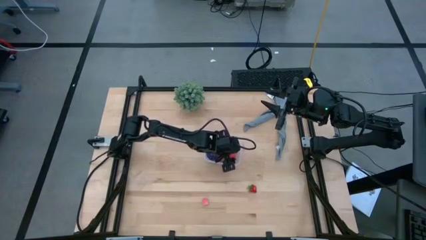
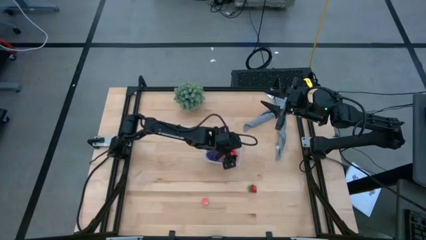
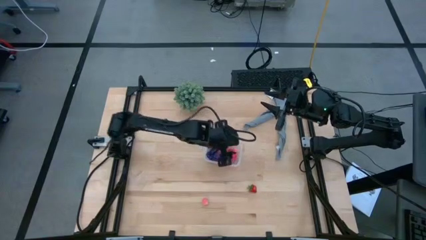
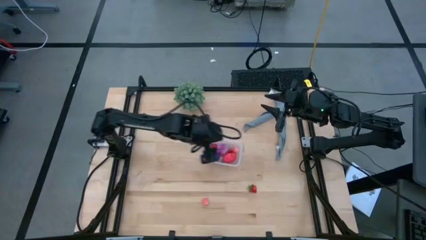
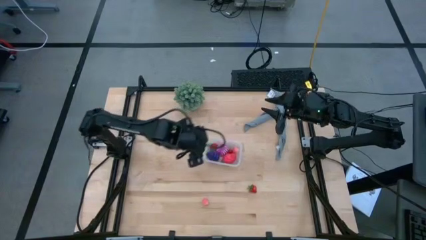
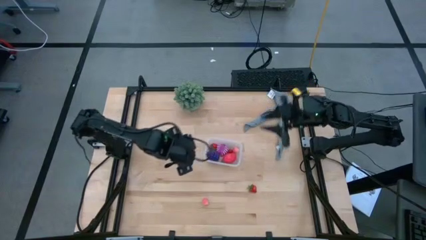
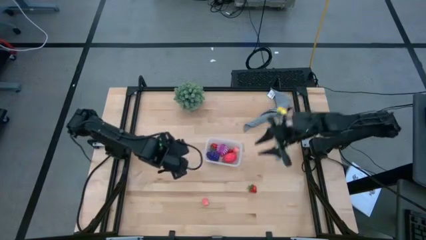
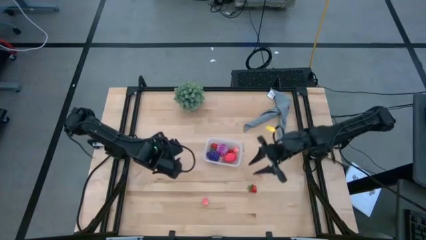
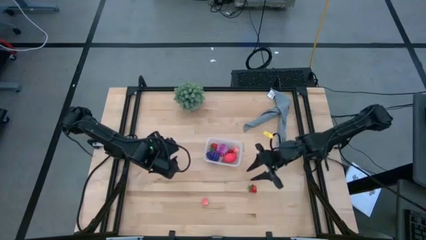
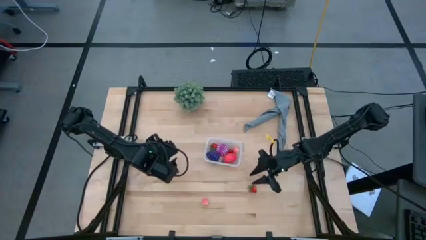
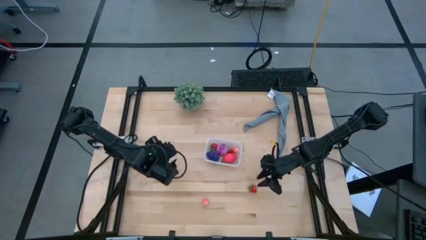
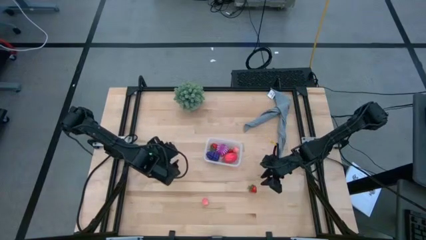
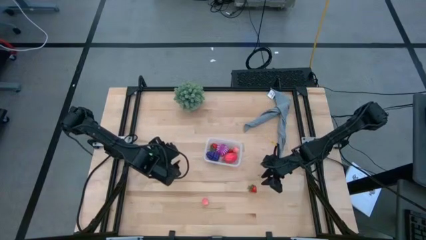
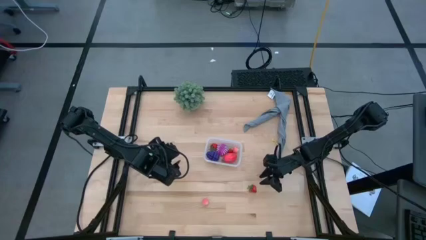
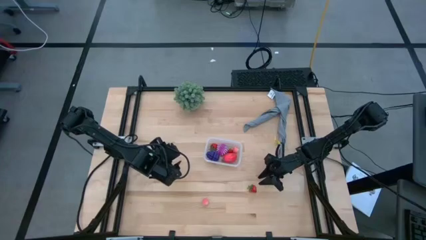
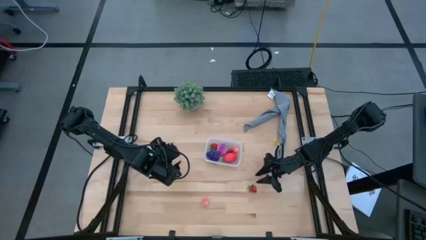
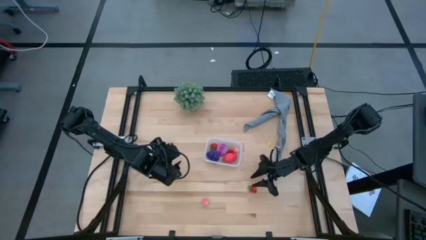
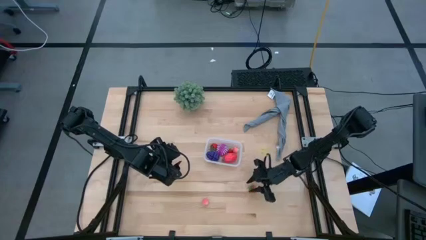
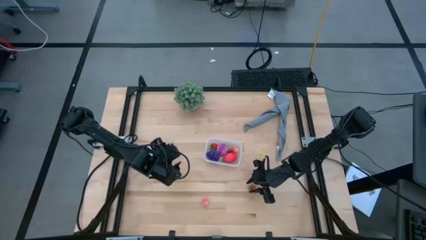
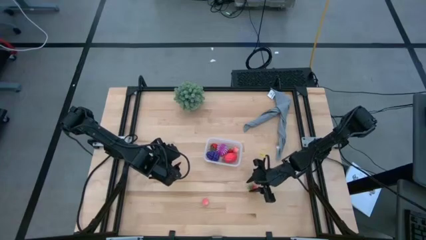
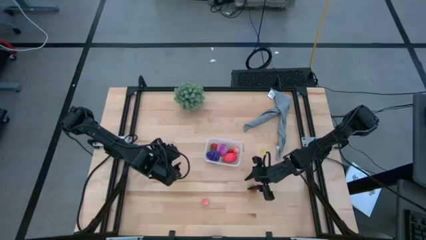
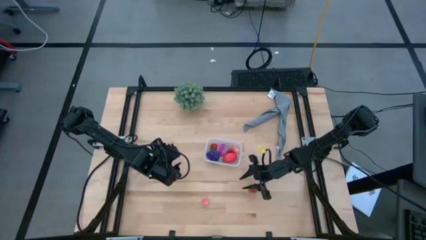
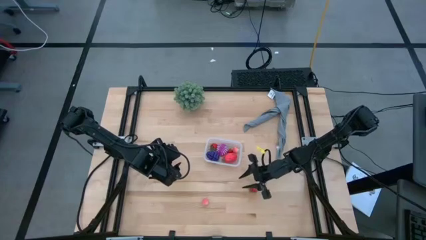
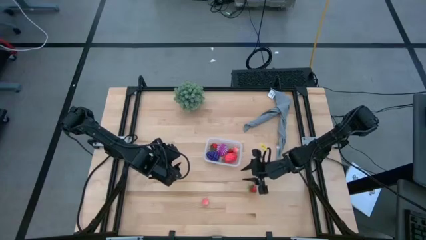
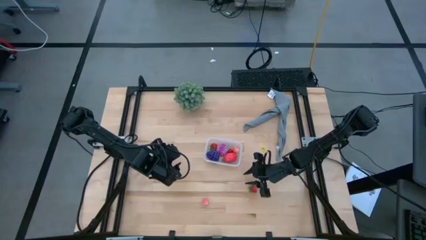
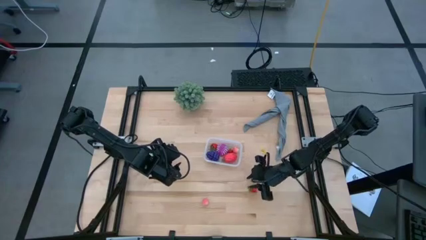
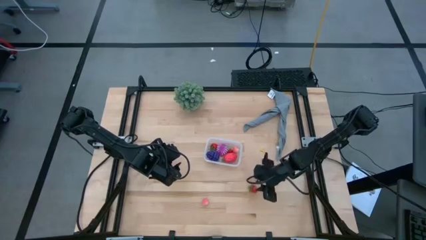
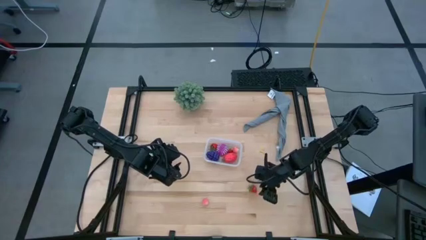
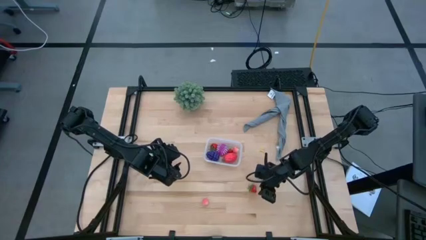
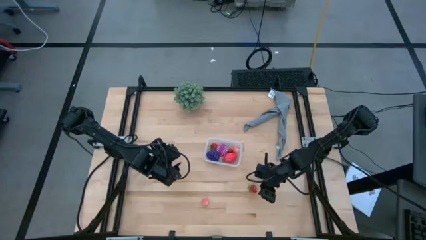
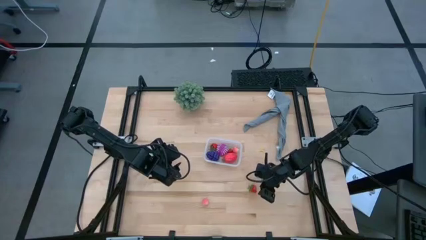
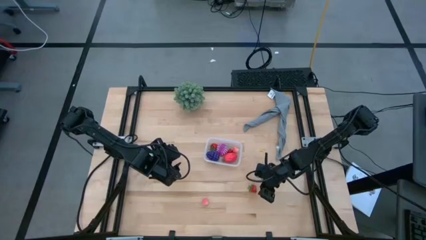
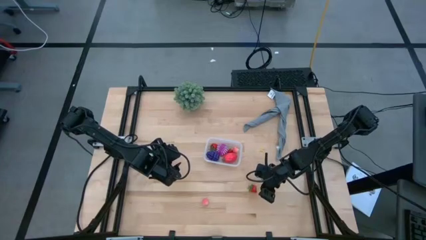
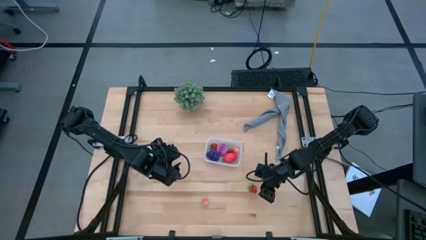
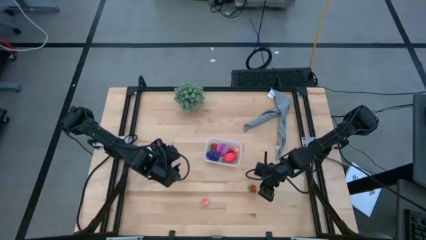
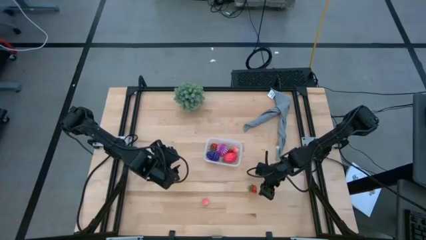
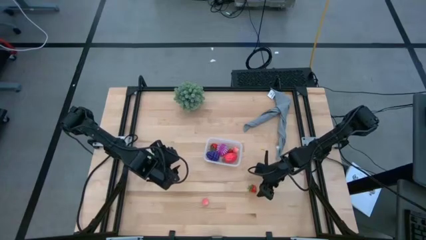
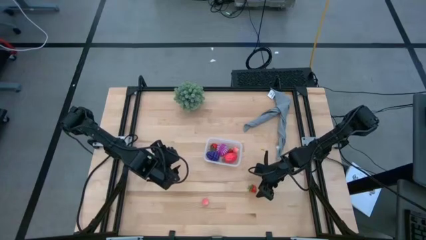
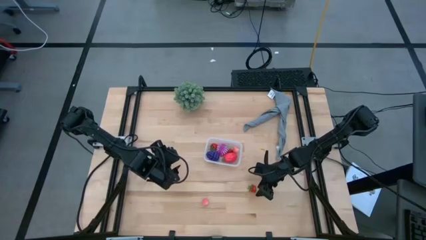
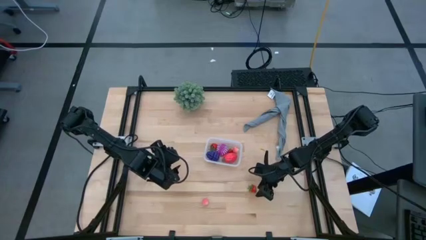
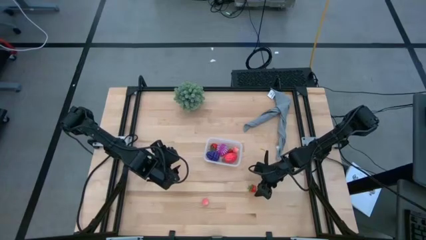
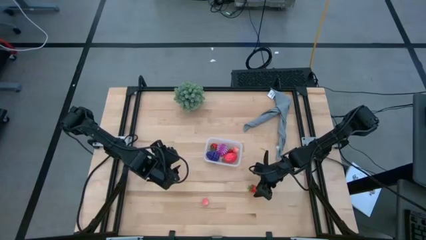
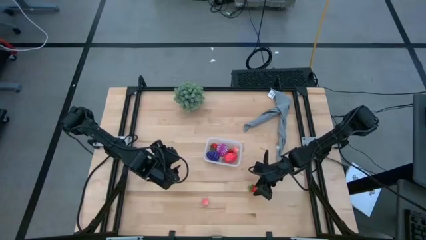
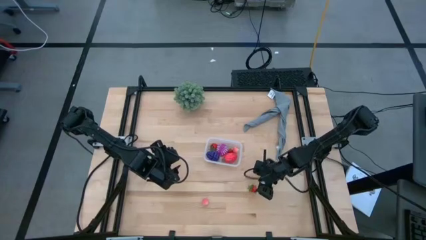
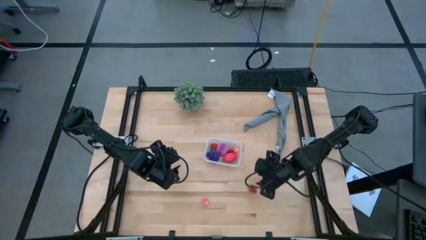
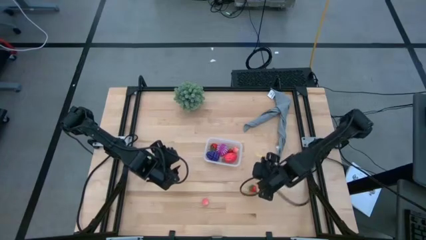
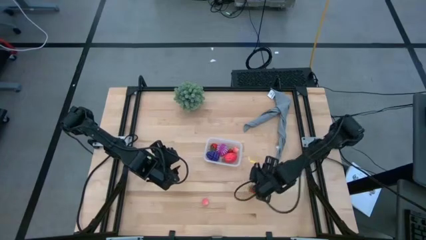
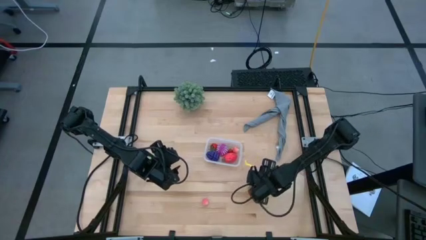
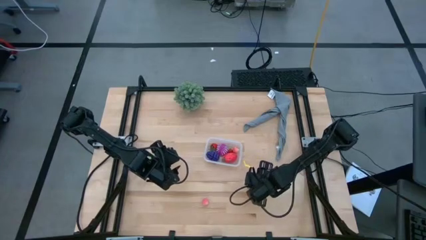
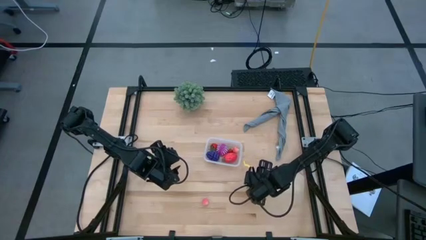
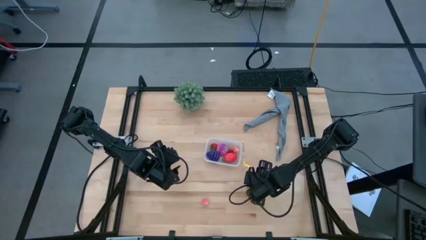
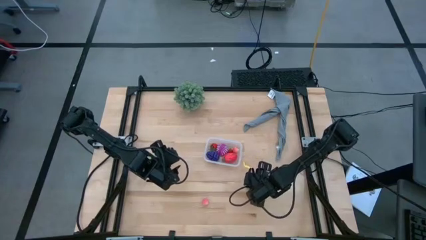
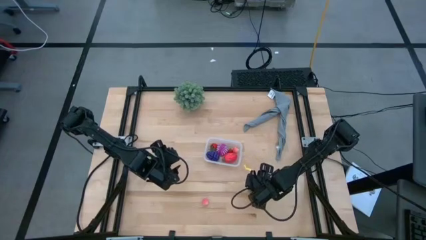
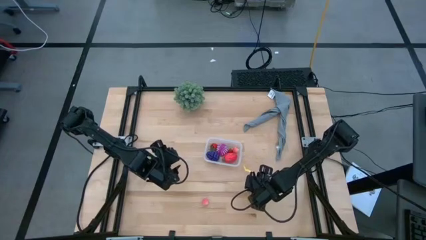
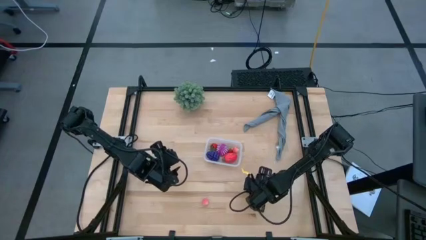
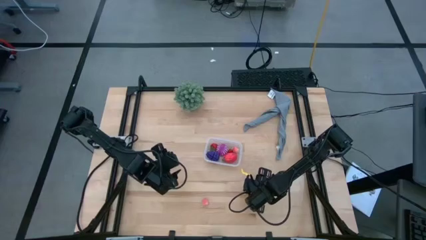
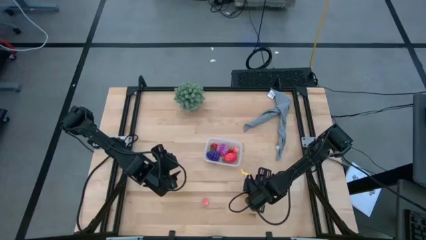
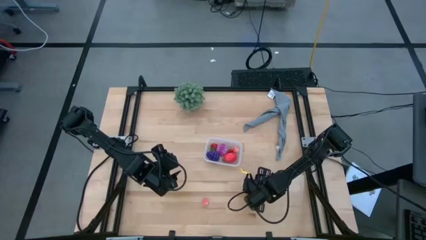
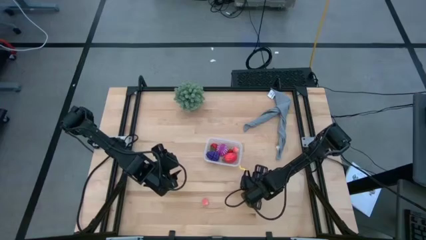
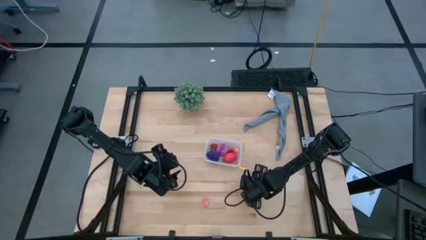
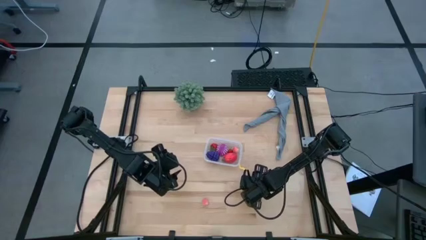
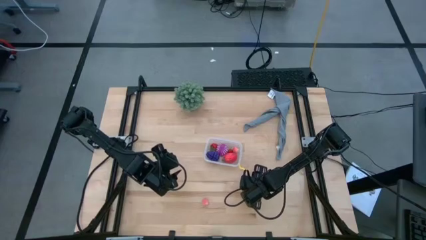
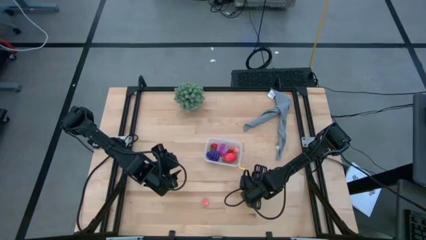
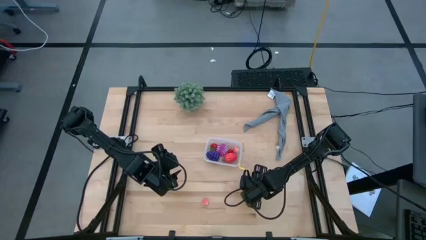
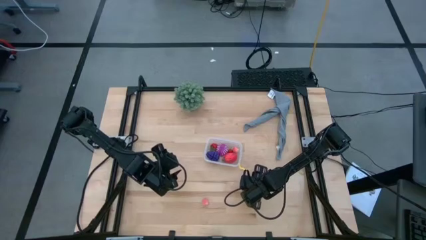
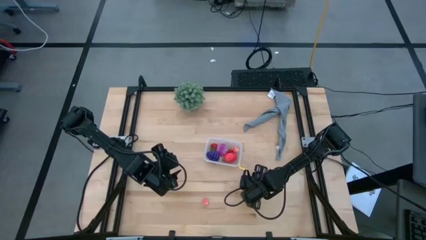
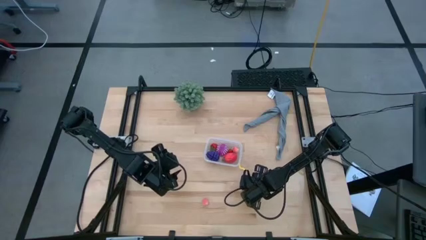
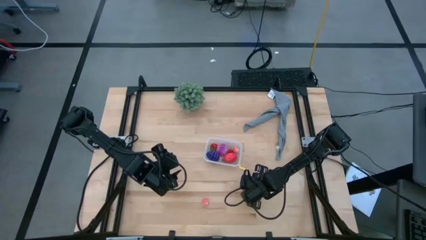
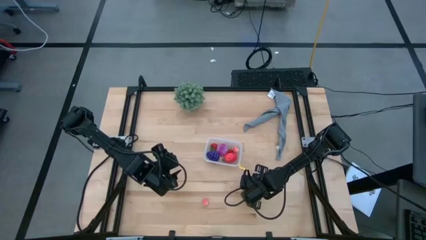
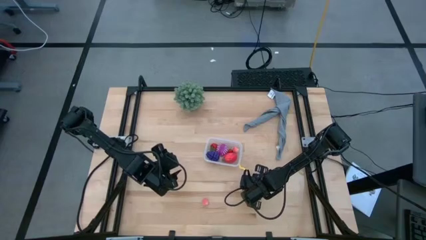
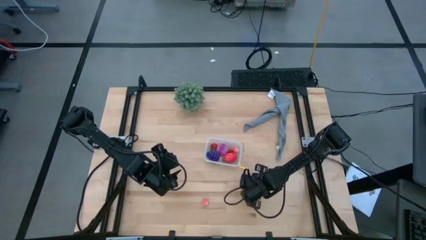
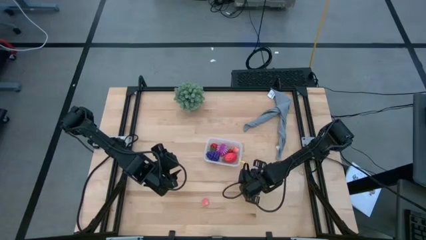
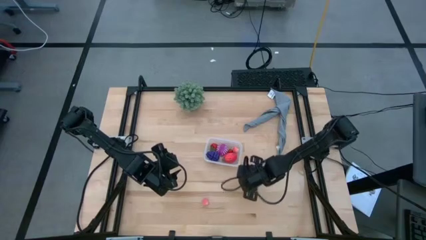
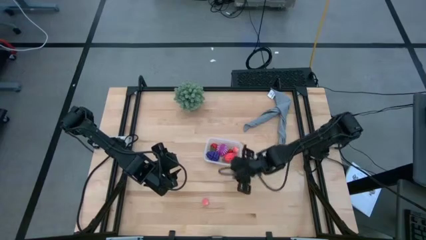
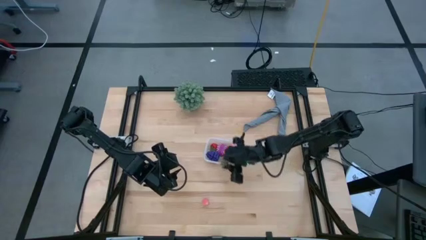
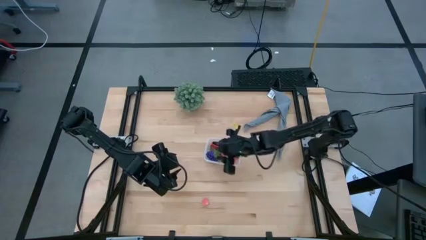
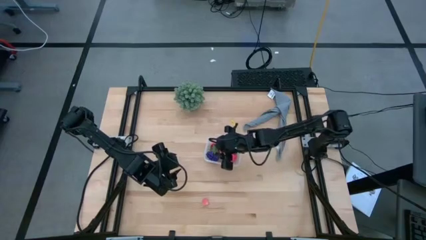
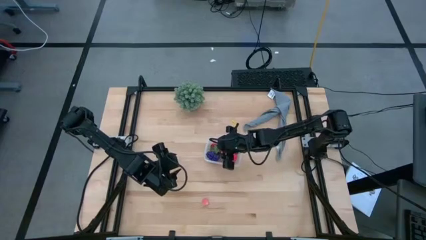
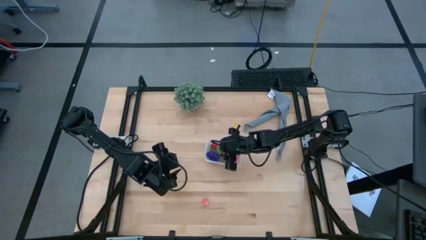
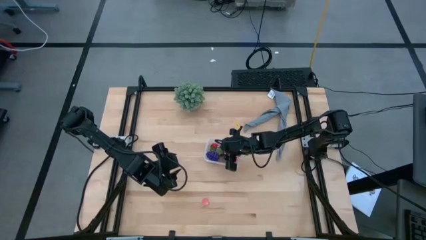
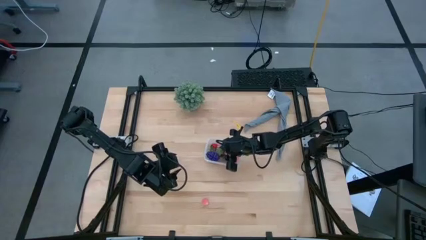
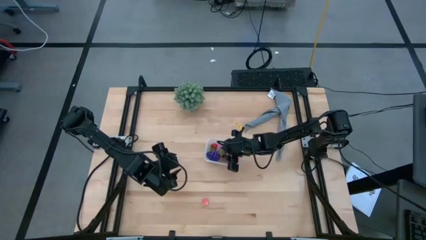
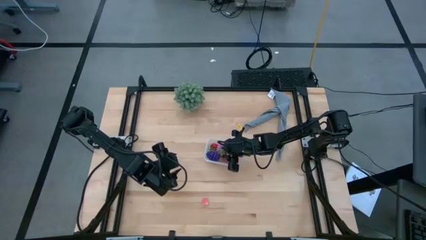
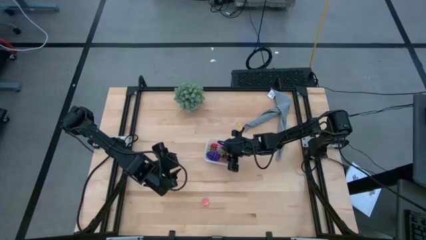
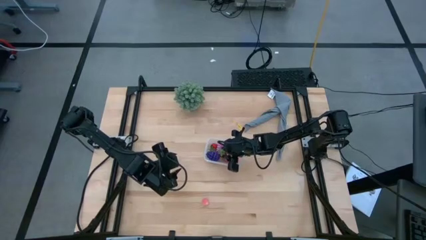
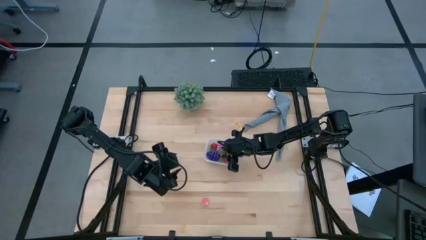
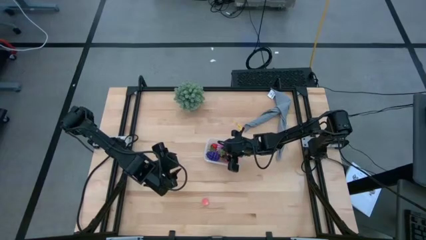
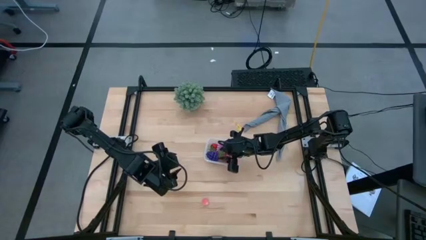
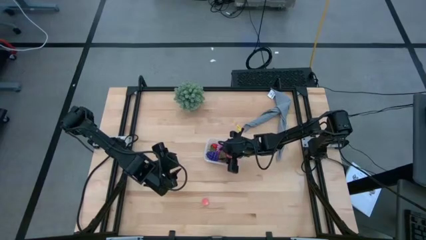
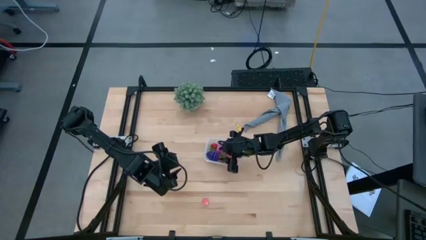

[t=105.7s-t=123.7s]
Task: Pick and placing Produce into tupperware
Put the strawberry into the transparent container
